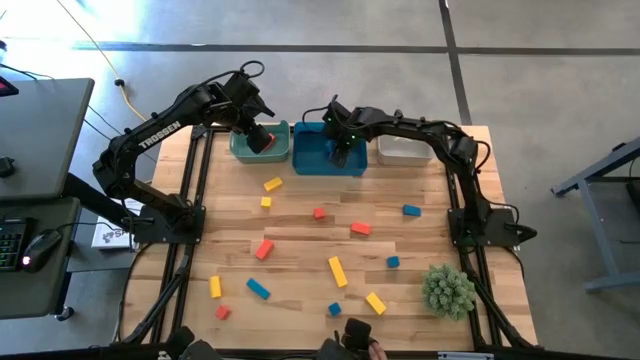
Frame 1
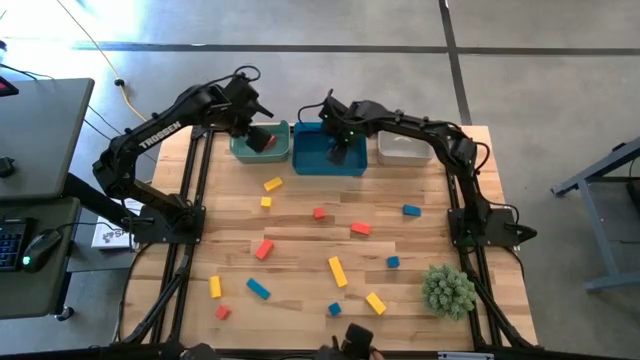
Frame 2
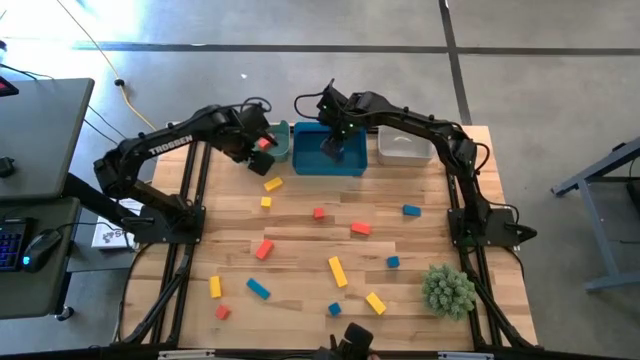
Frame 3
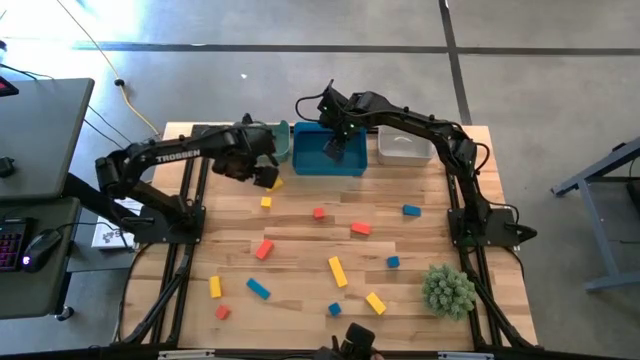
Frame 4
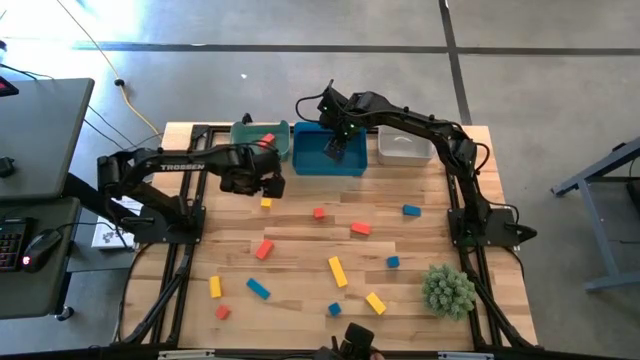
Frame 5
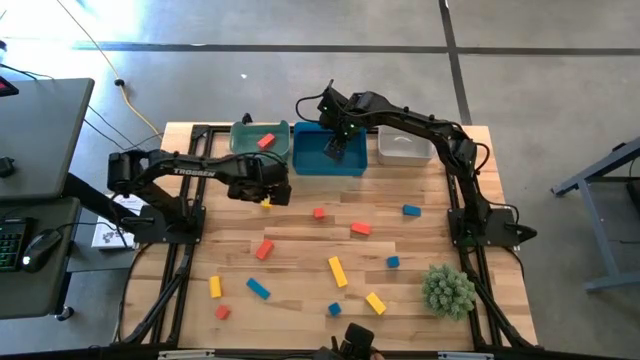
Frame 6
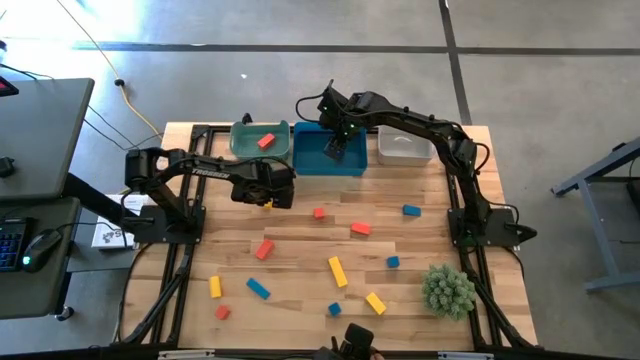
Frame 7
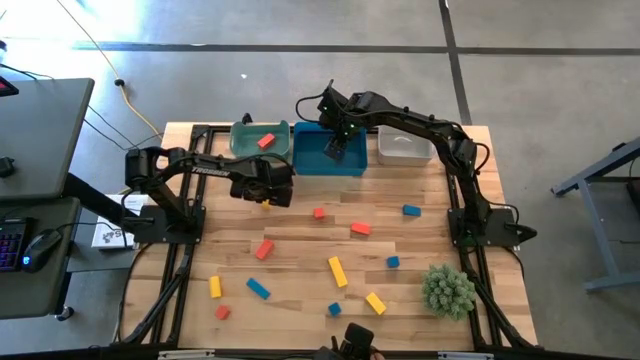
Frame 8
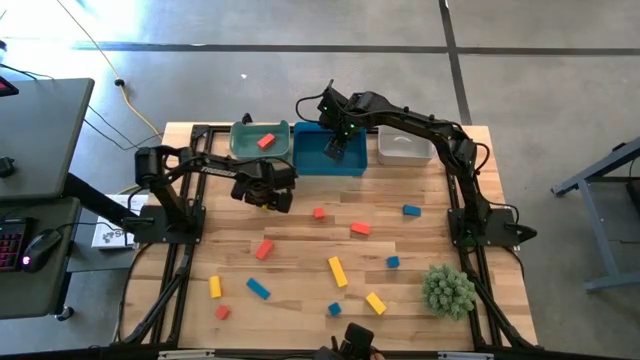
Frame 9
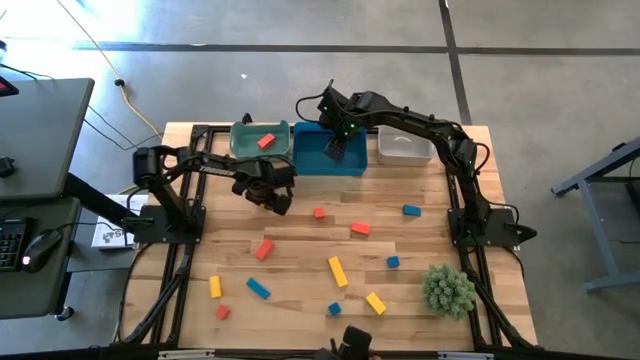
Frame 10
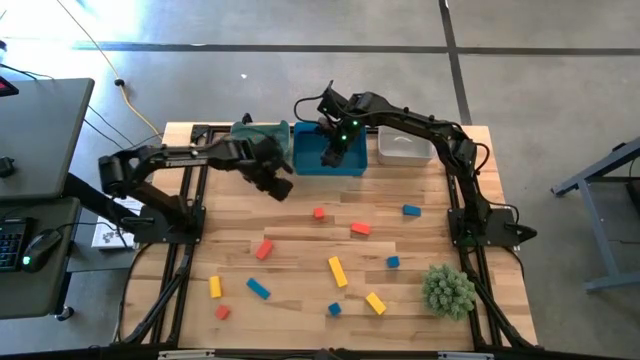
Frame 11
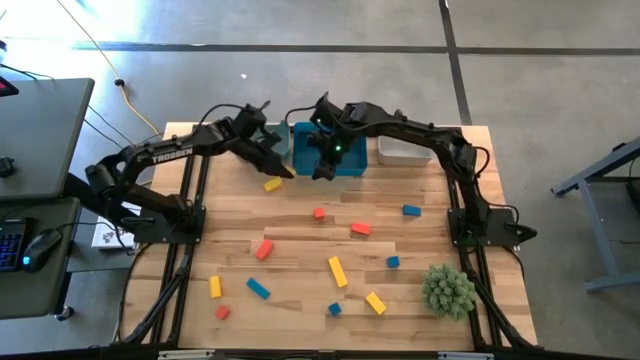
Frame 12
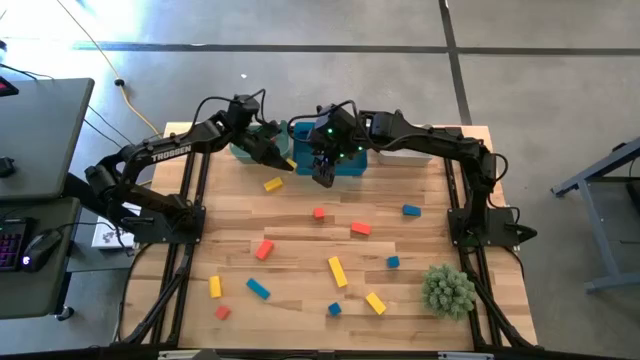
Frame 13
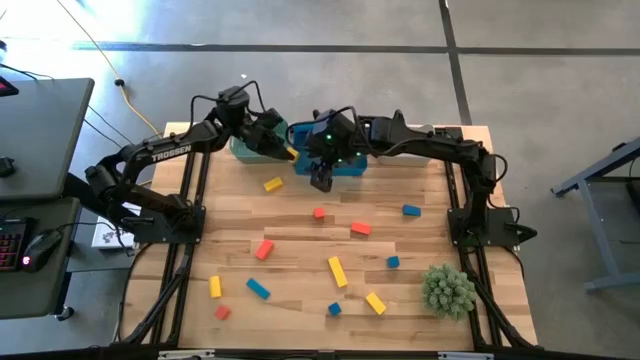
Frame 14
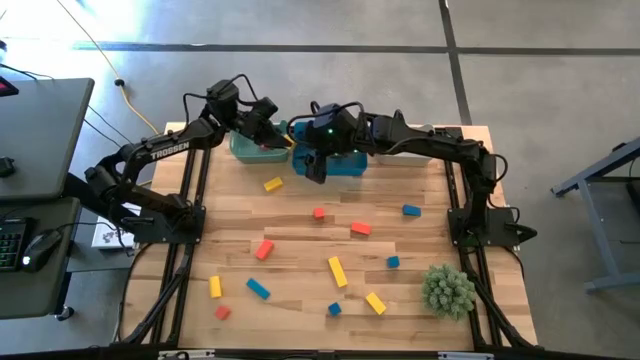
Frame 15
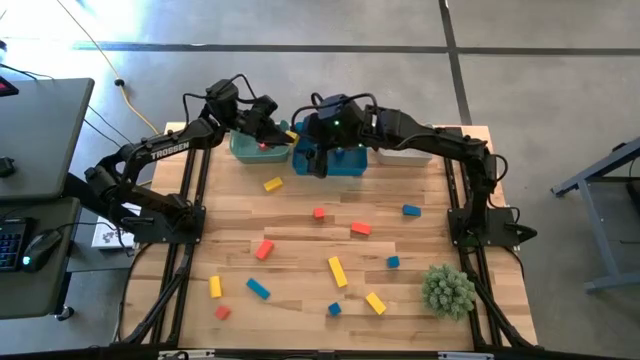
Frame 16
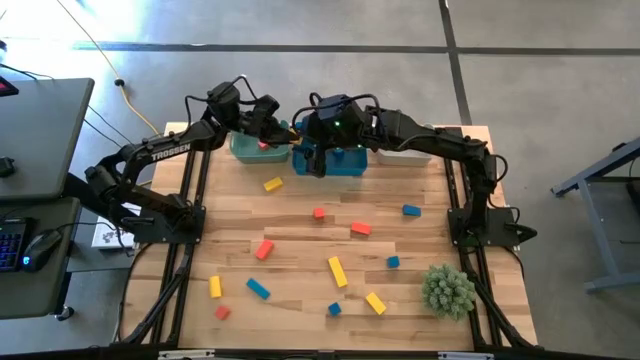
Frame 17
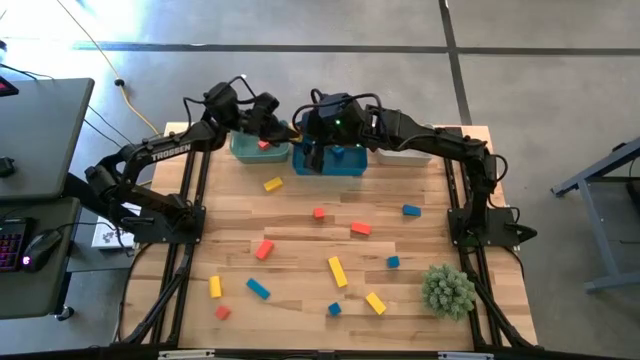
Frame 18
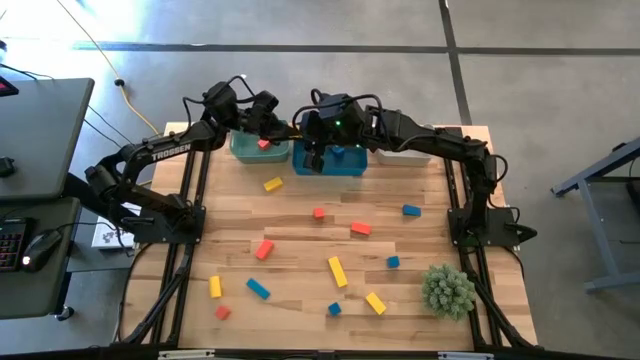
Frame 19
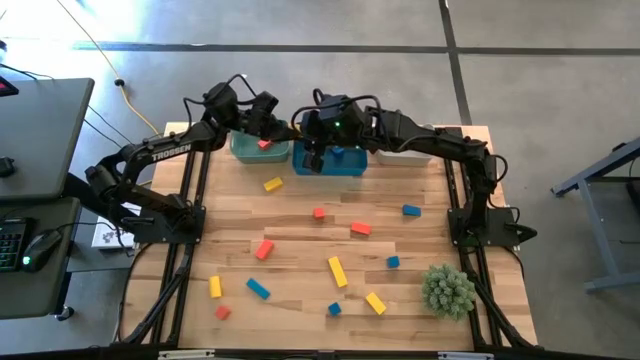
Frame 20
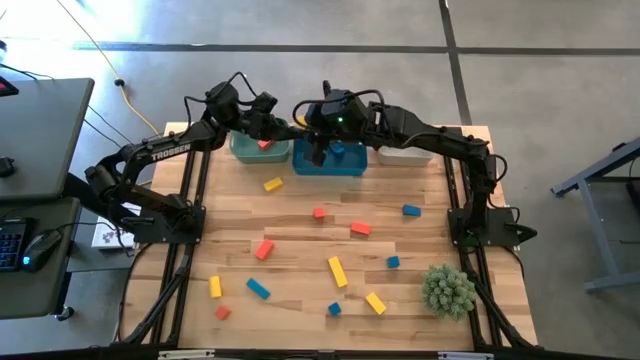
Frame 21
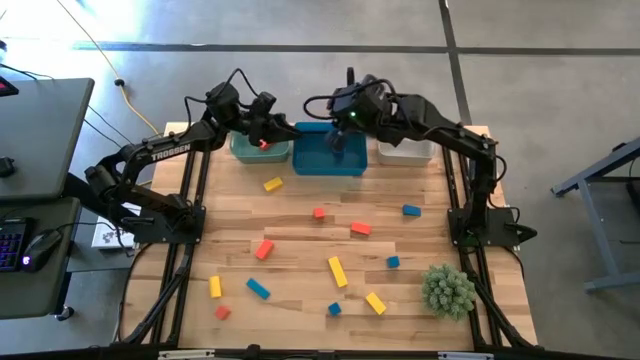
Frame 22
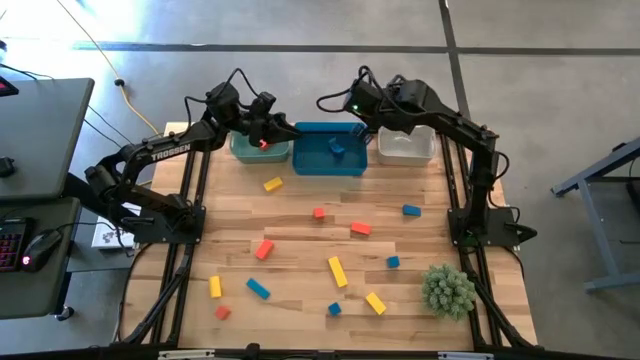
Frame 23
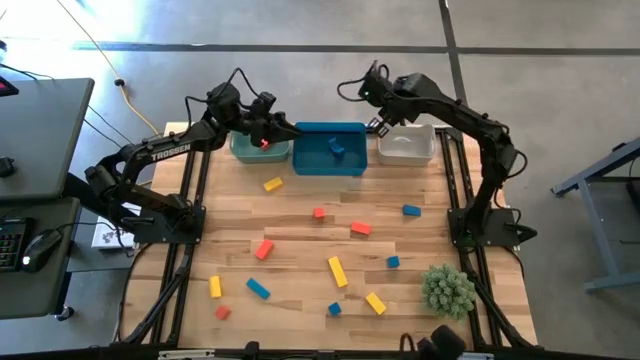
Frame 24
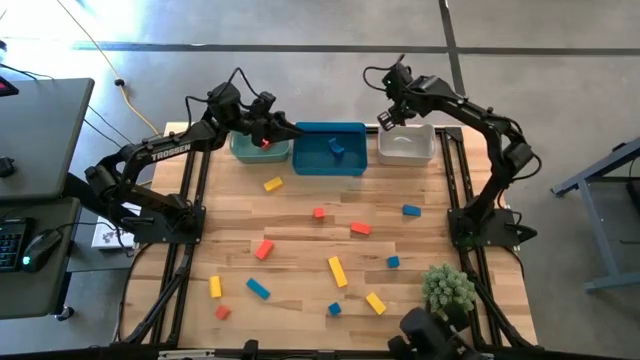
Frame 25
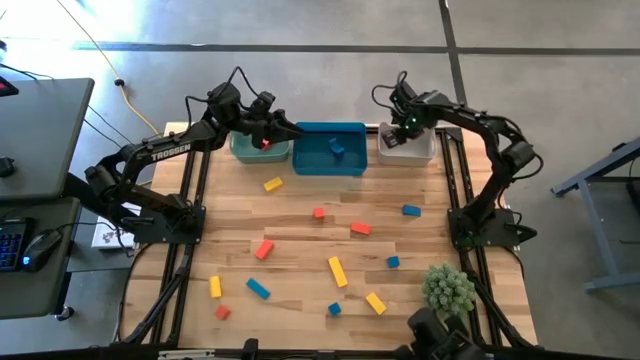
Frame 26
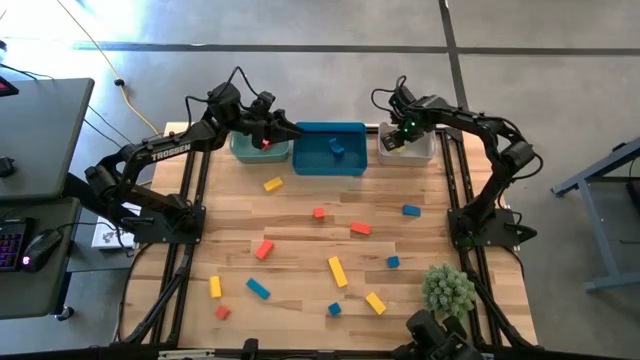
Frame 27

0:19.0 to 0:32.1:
Task: Sort & place blocks by color
Put the yellow block into the white bin

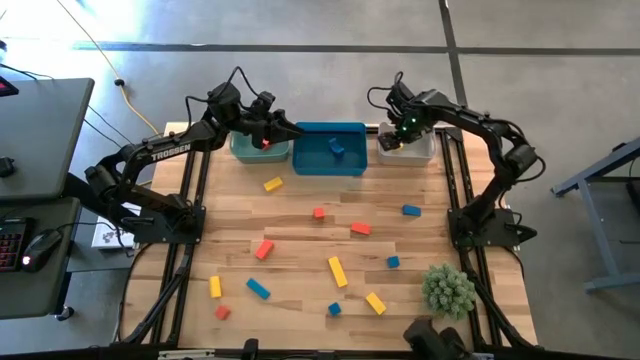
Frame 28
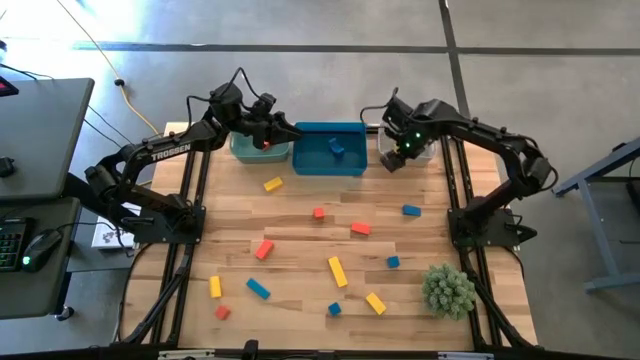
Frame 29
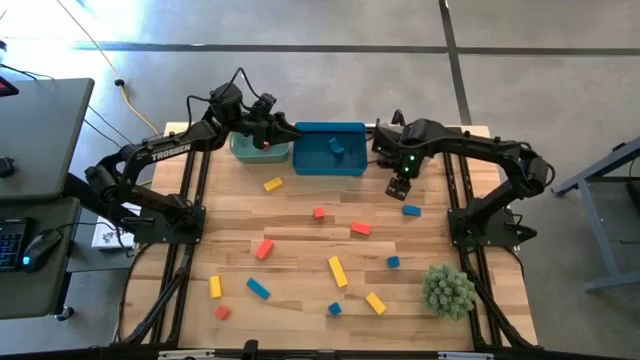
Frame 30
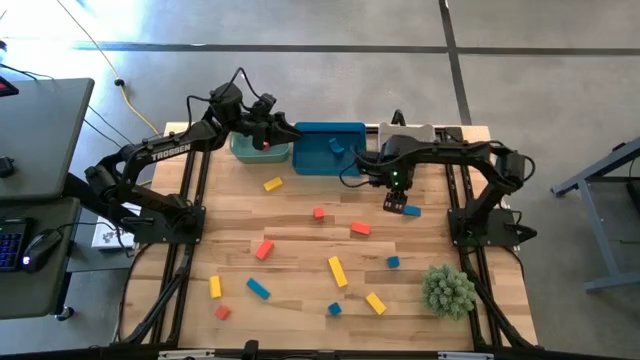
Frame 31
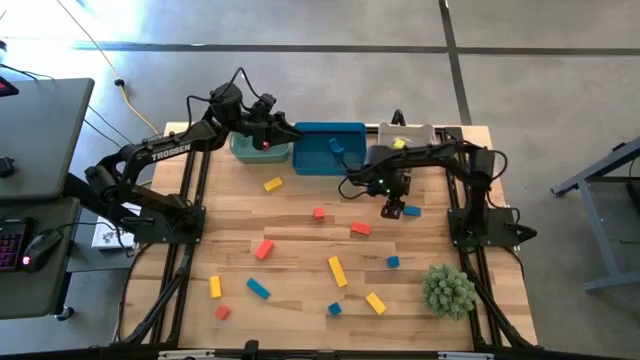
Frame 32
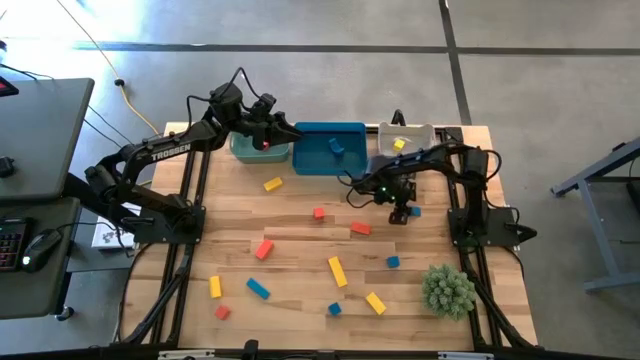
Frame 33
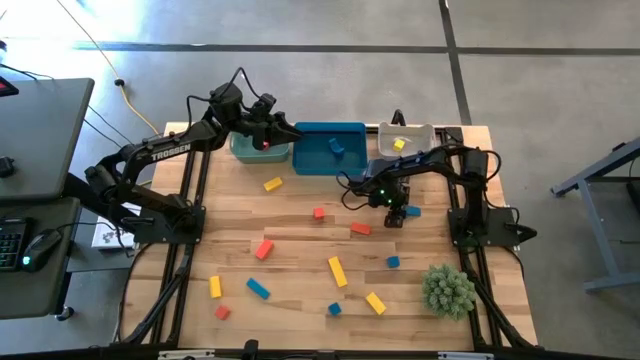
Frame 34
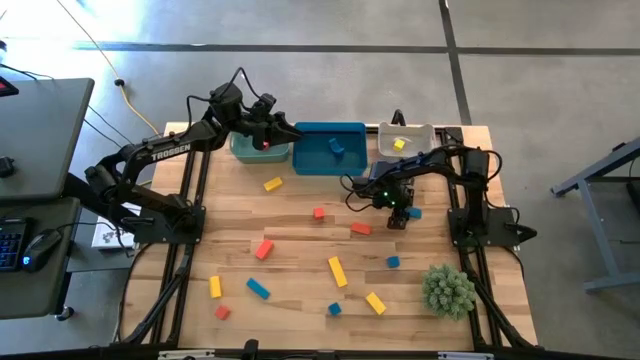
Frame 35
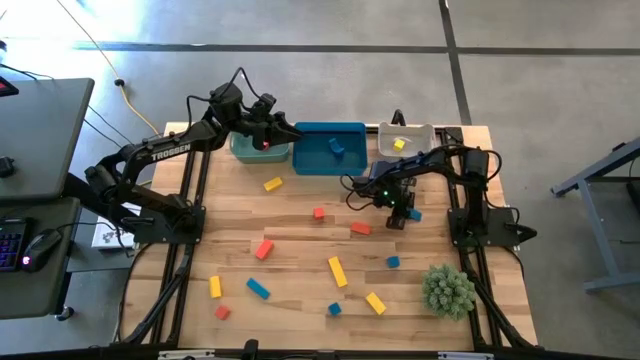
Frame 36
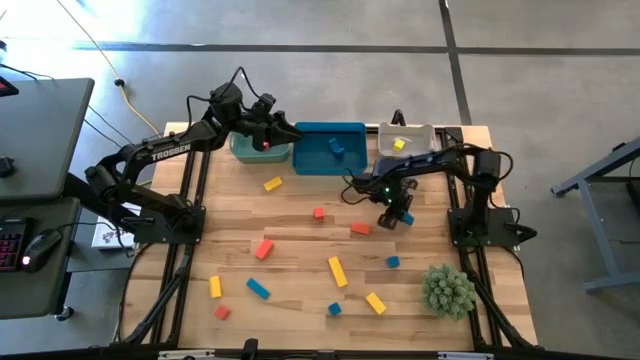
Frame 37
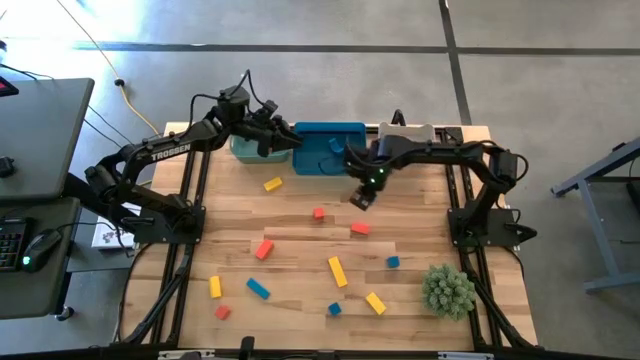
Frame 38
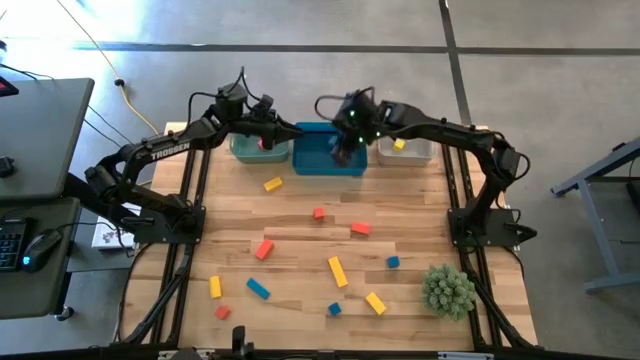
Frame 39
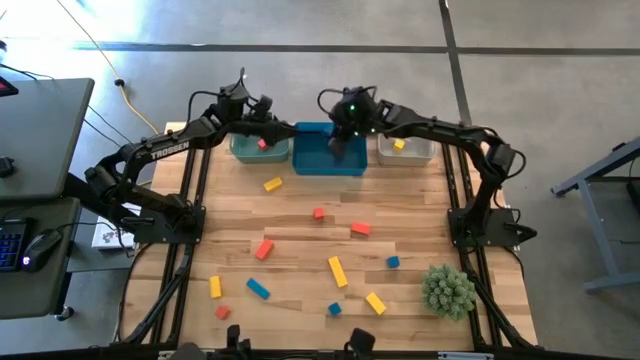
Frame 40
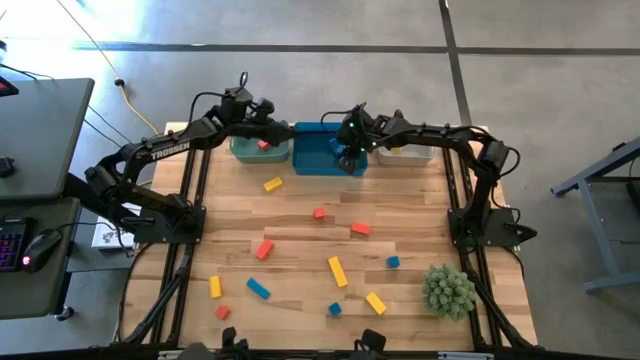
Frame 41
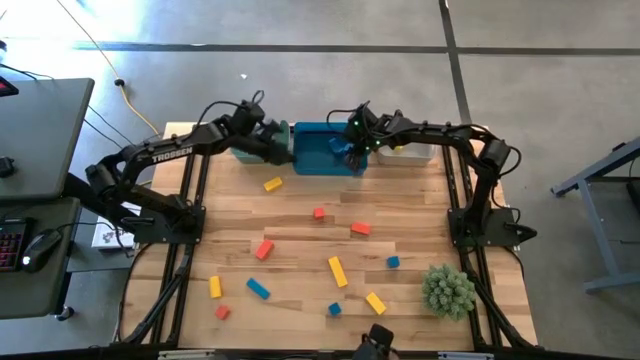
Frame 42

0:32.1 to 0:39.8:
Put the blue block into the blue bin
